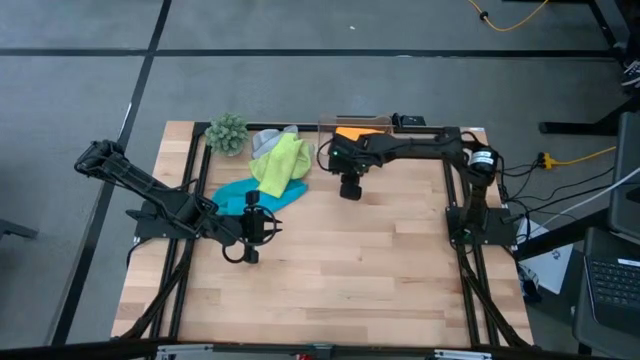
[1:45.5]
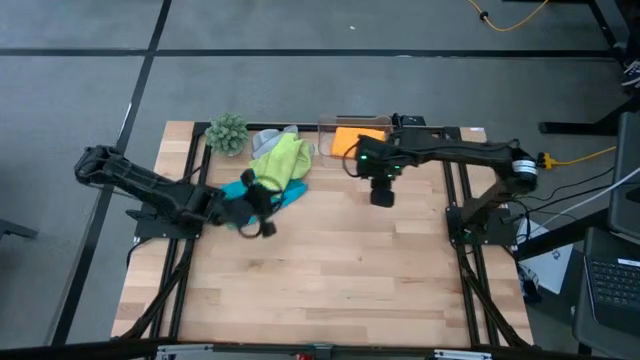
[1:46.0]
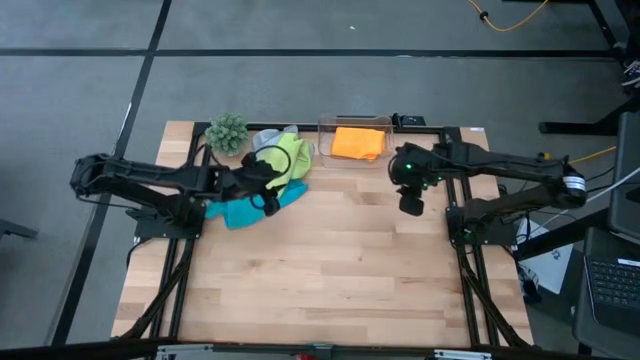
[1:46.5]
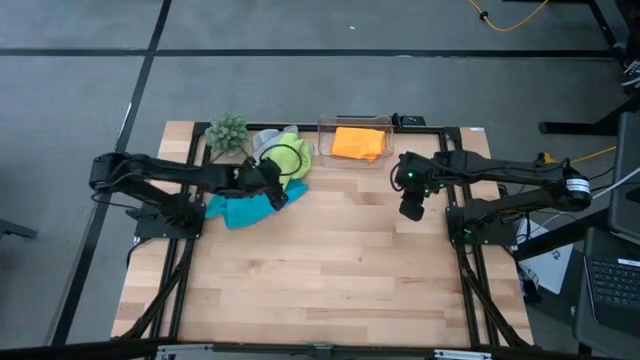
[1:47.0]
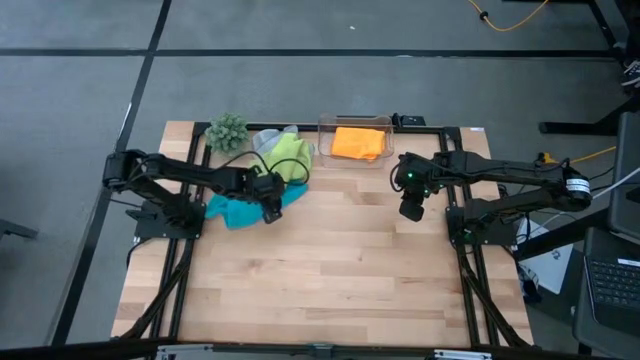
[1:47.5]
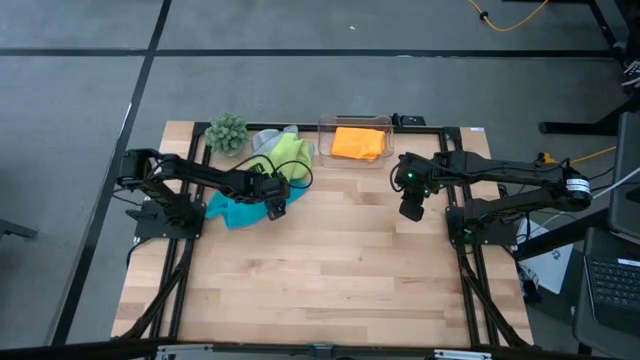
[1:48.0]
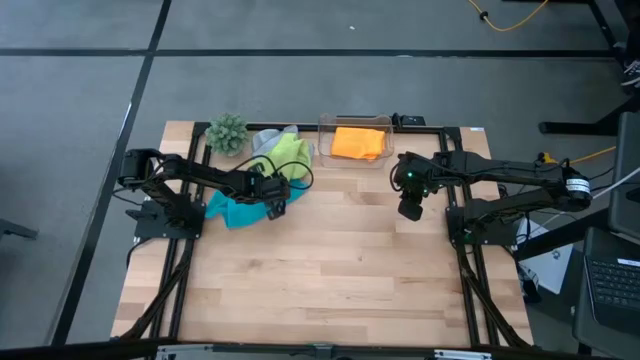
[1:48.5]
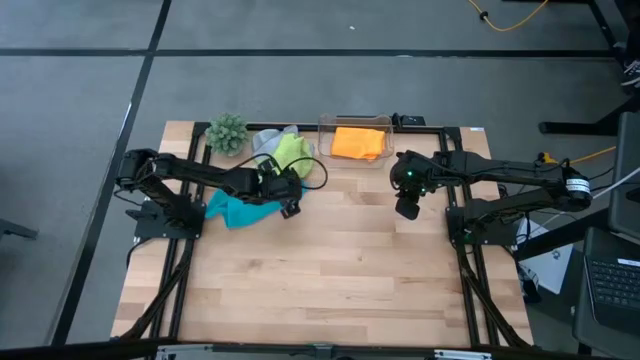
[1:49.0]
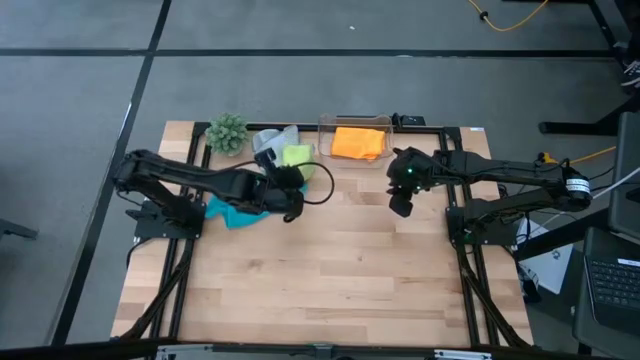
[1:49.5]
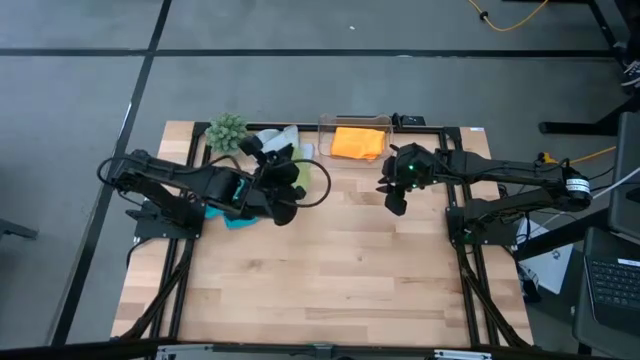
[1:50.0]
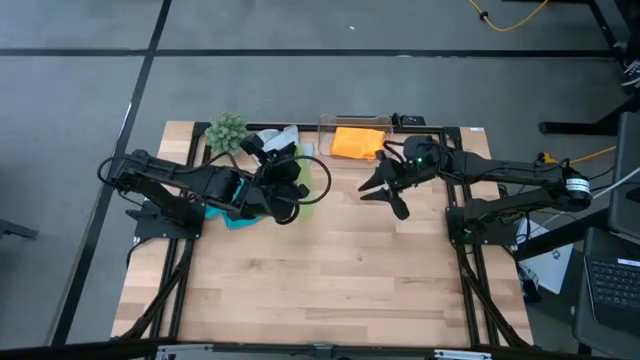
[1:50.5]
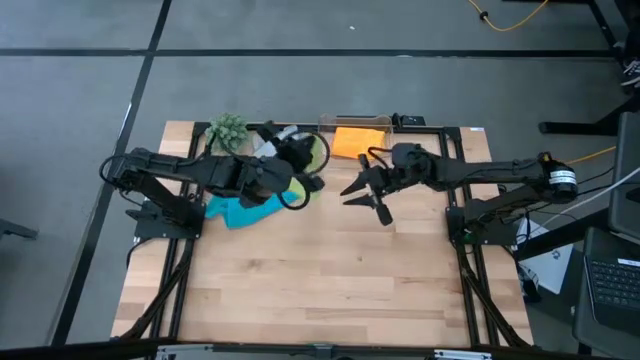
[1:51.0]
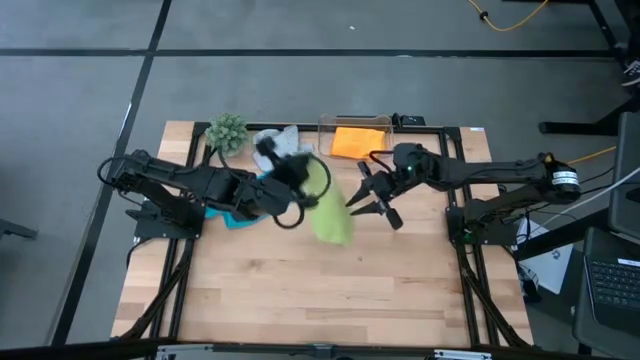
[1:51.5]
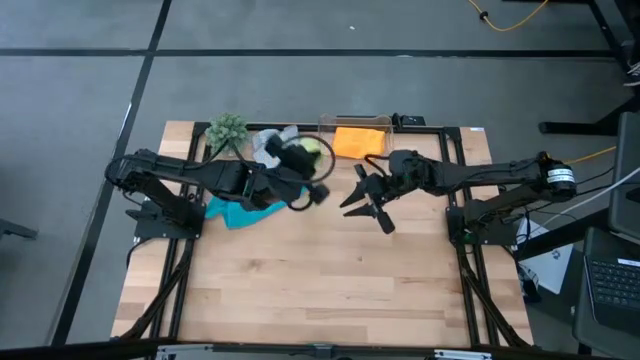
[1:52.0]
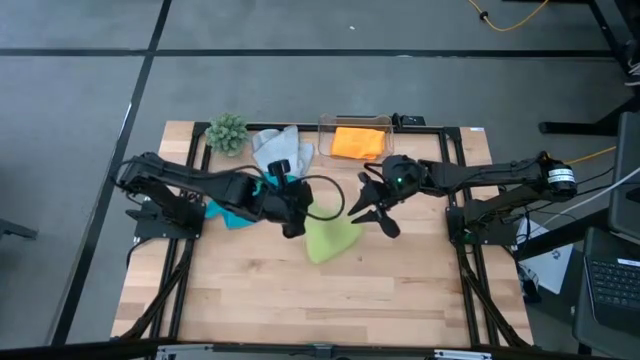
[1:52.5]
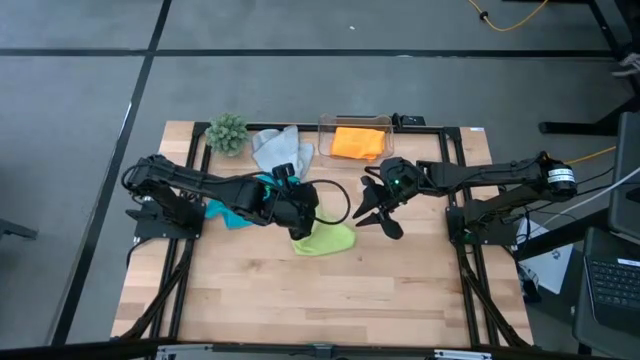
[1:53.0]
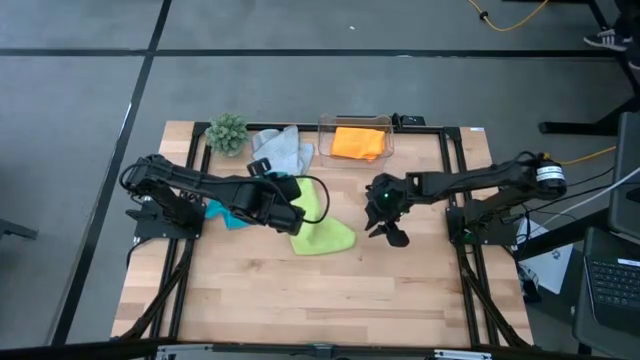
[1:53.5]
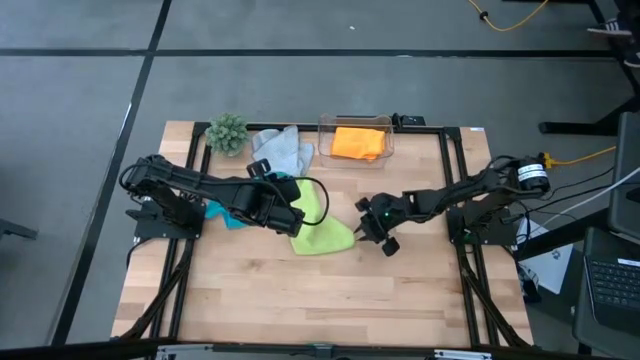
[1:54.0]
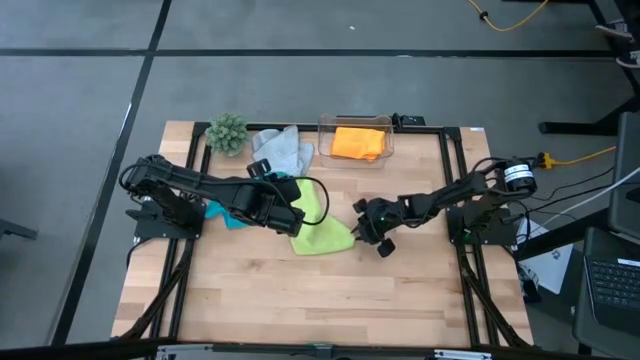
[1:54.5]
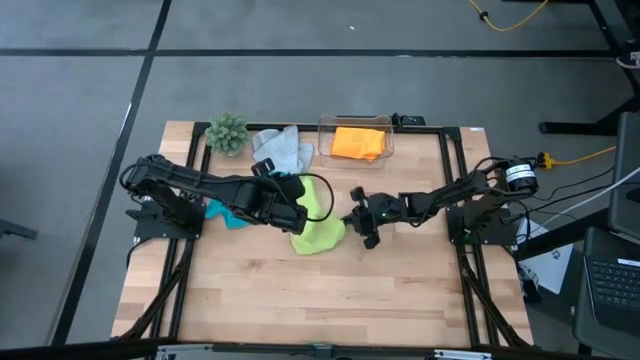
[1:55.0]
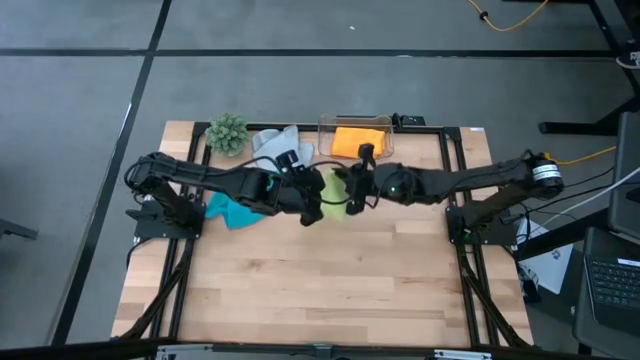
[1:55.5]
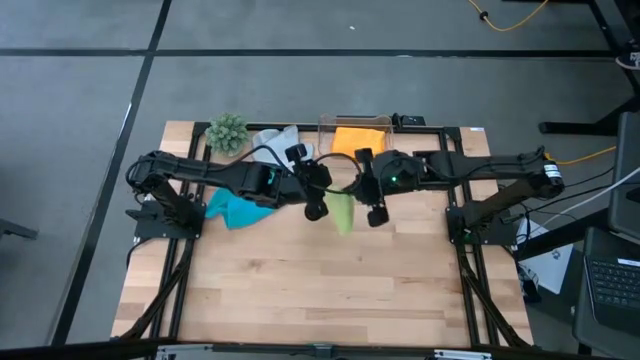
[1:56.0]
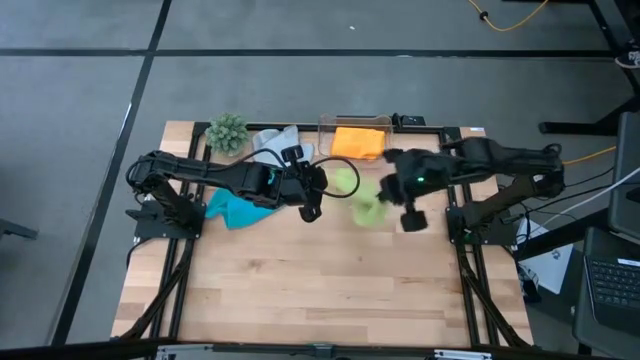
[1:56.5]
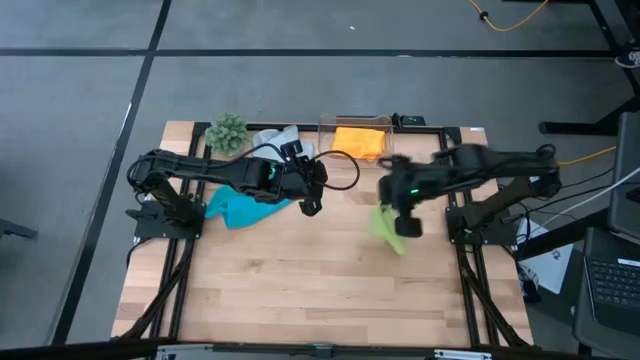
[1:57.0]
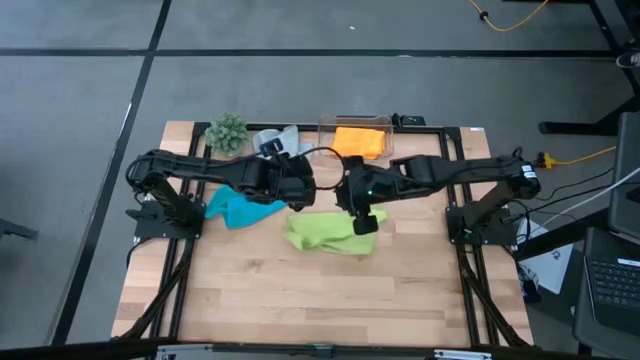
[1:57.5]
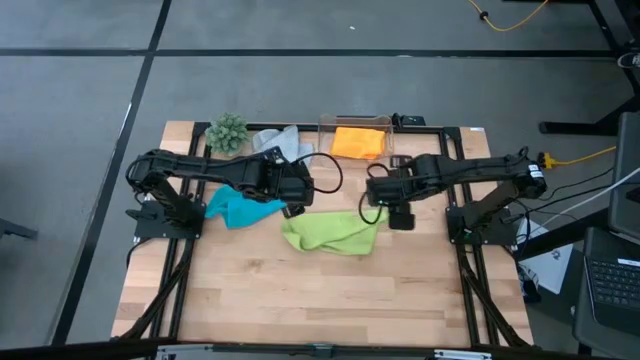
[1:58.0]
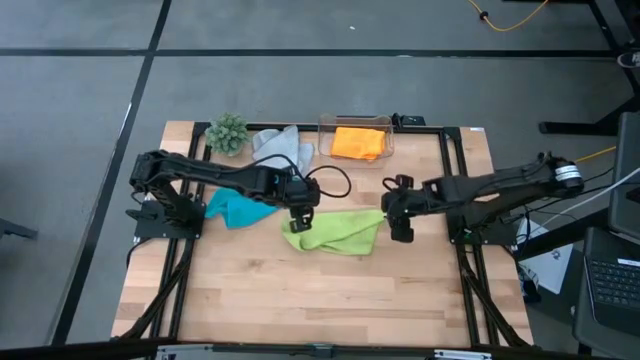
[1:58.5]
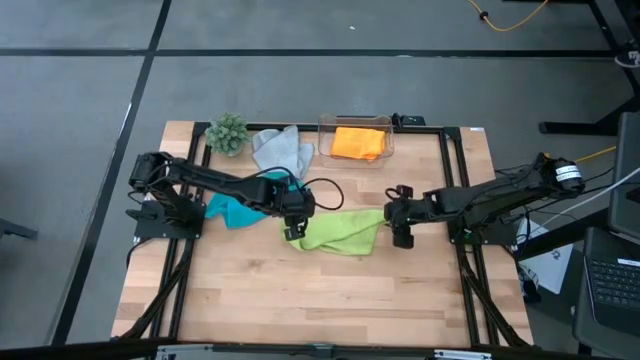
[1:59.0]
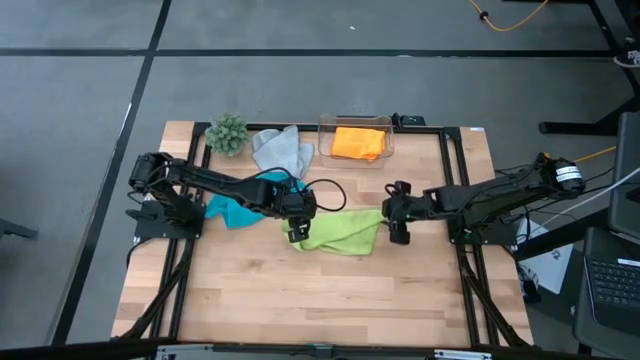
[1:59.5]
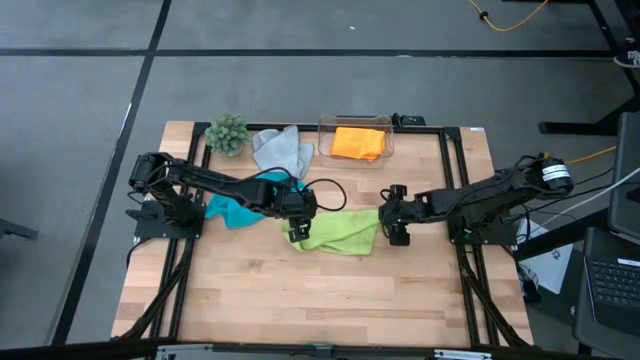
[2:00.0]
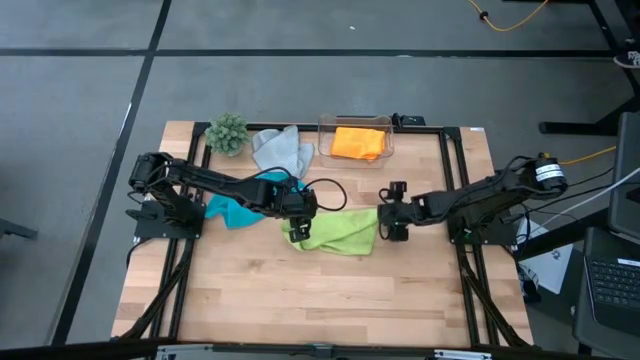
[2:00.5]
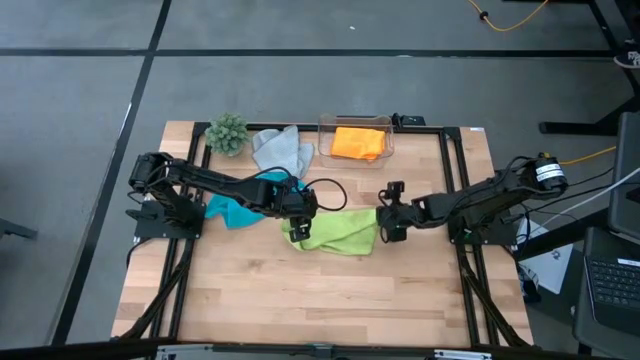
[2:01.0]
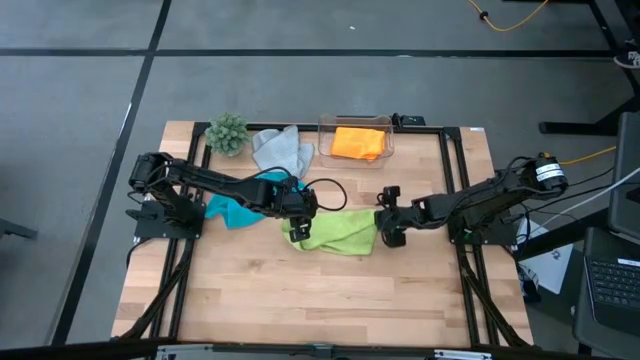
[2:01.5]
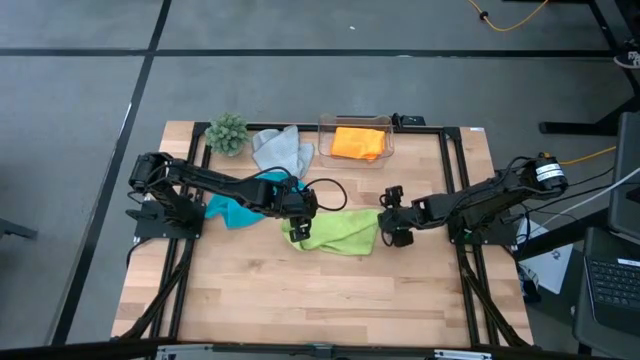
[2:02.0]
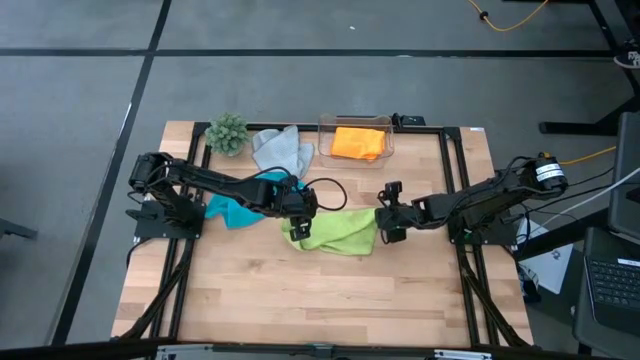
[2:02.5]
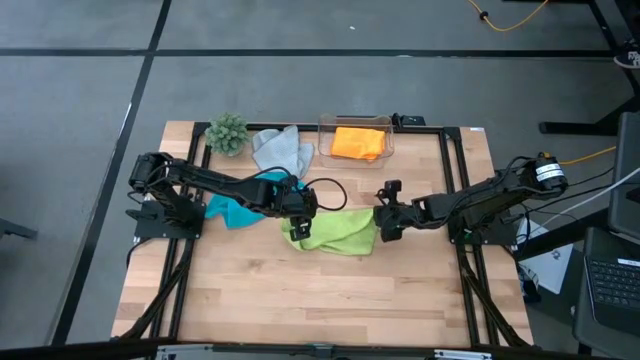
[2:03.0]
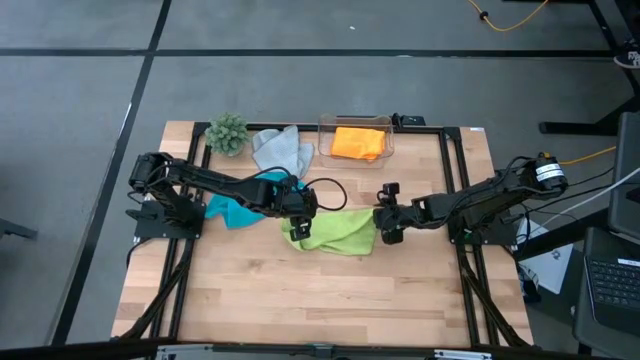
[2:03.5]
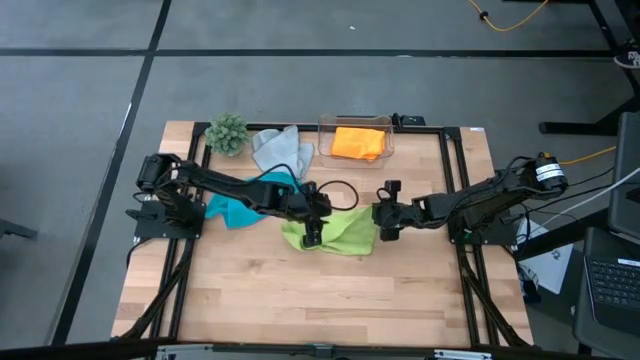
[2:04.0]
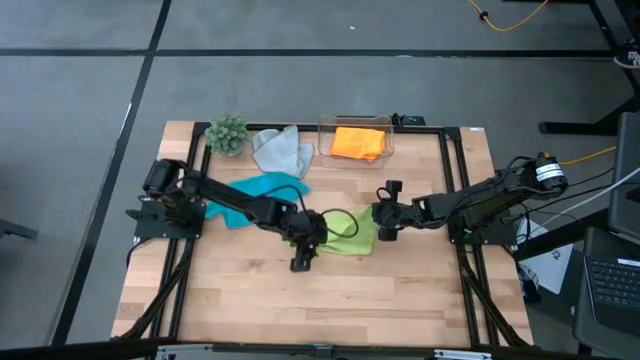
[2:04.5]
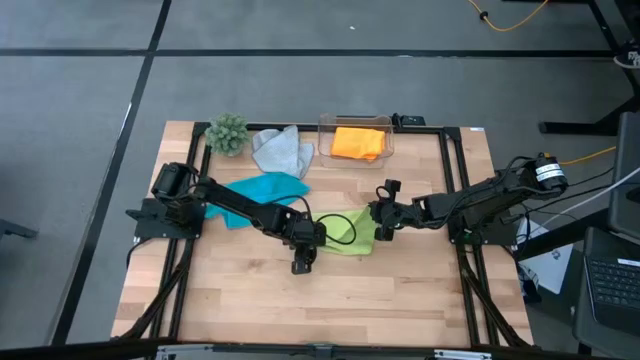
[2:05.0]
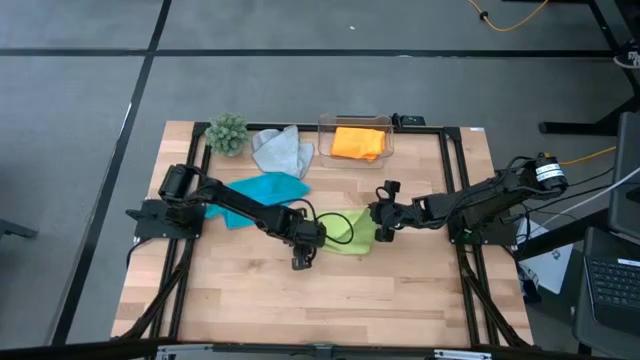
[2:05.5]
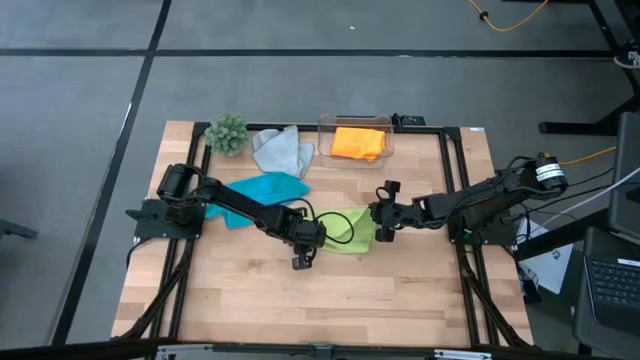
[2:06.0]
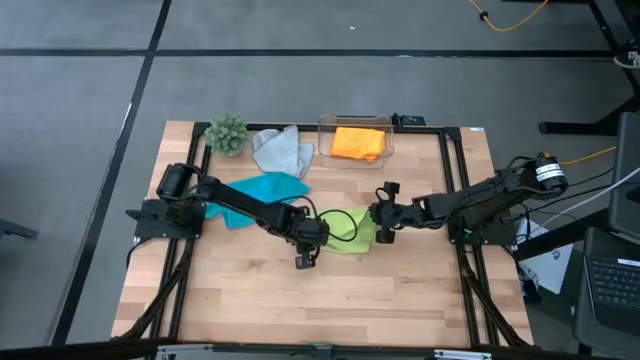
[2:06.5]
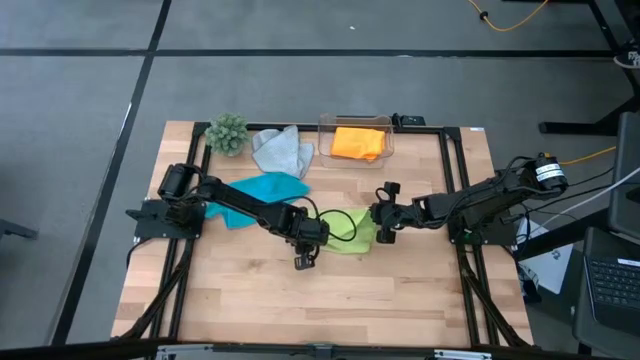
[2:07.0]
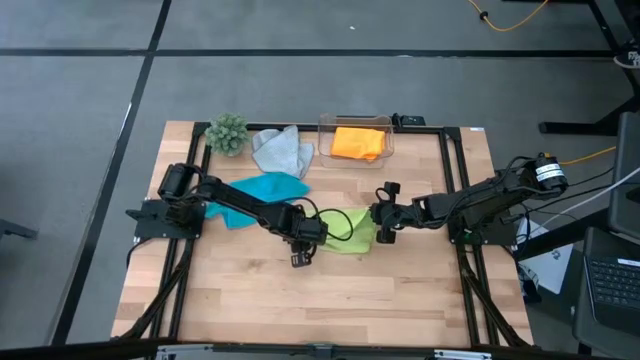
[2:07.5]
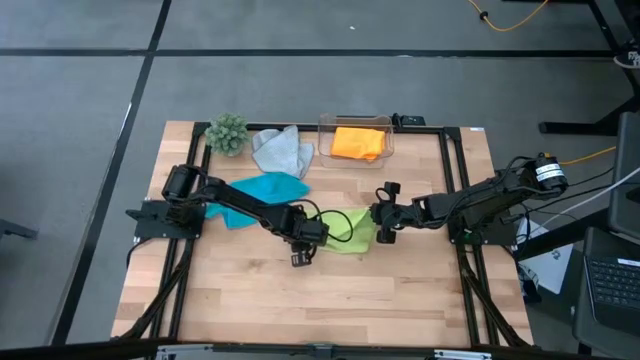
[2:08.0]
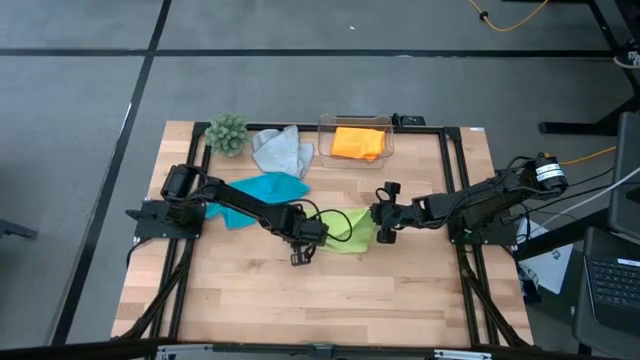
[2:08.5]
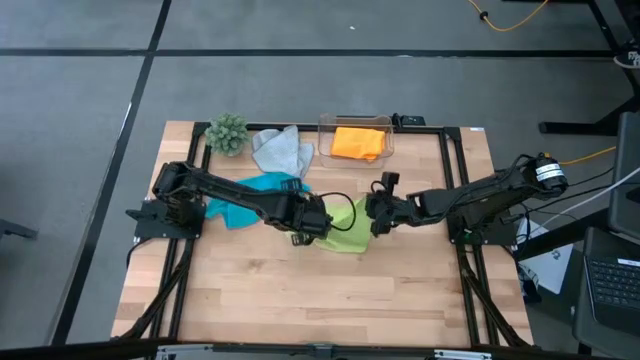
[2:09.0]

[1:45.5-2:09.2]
Task: Fold microfiber towels
Fold the green microfiber cloth
